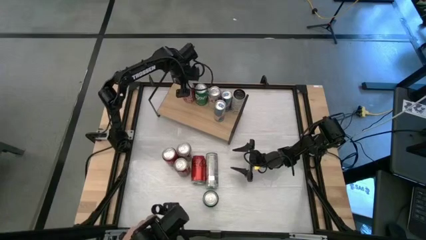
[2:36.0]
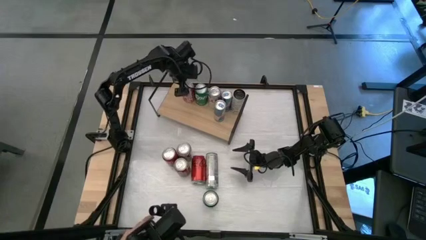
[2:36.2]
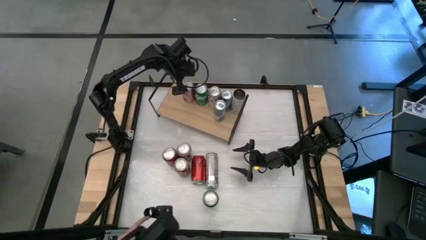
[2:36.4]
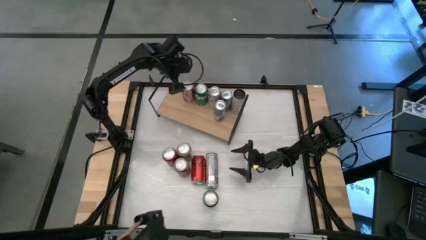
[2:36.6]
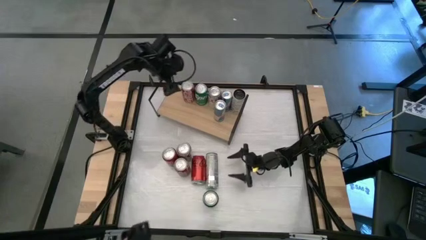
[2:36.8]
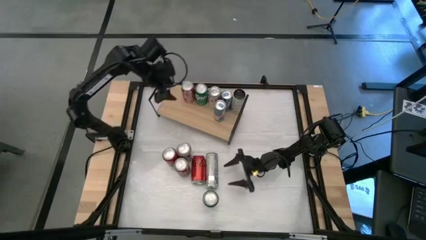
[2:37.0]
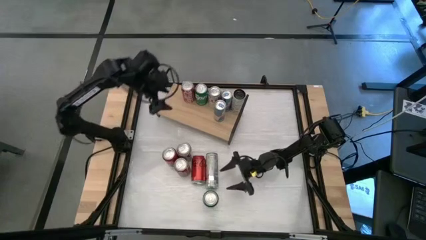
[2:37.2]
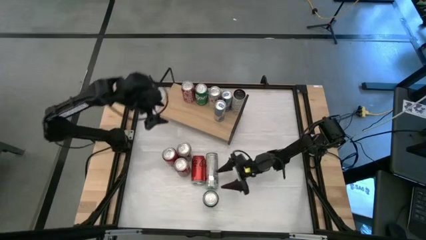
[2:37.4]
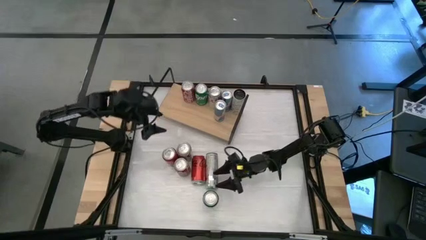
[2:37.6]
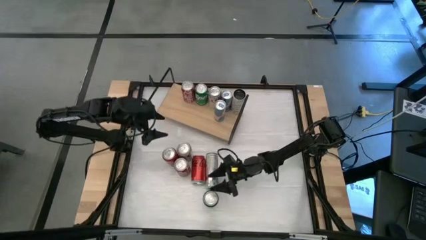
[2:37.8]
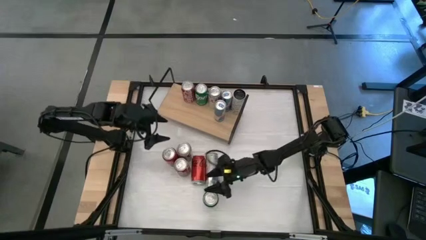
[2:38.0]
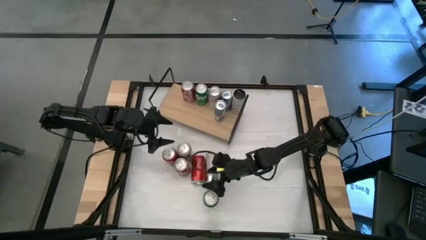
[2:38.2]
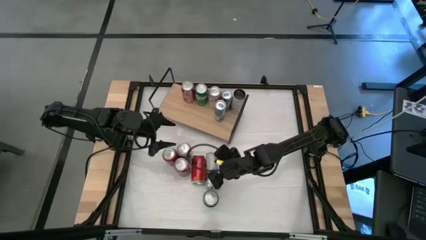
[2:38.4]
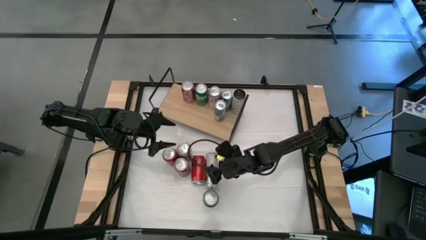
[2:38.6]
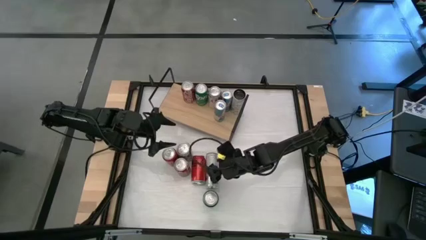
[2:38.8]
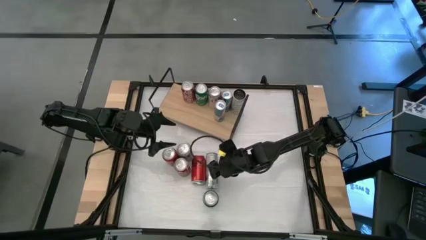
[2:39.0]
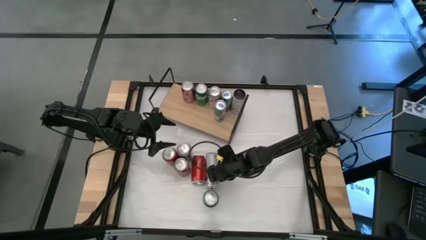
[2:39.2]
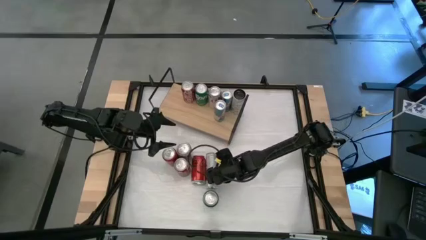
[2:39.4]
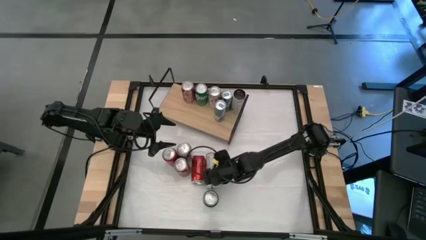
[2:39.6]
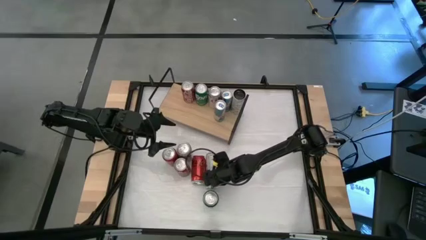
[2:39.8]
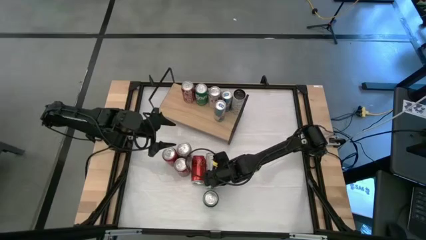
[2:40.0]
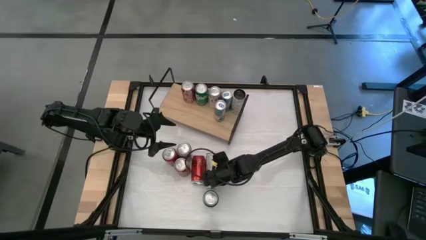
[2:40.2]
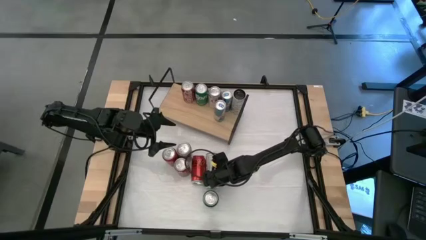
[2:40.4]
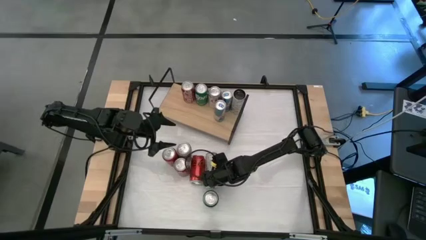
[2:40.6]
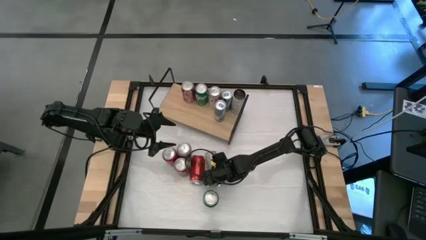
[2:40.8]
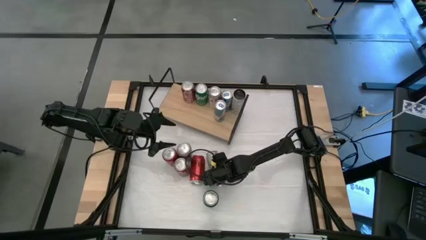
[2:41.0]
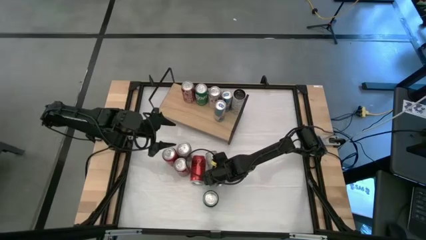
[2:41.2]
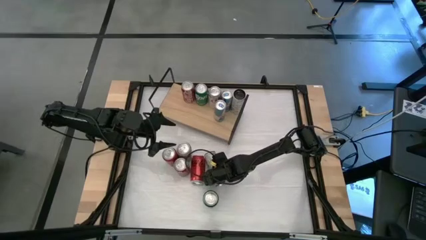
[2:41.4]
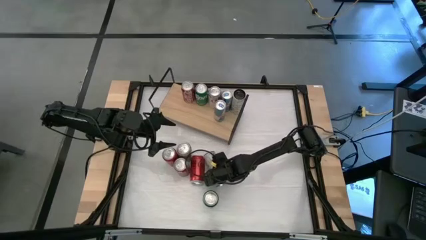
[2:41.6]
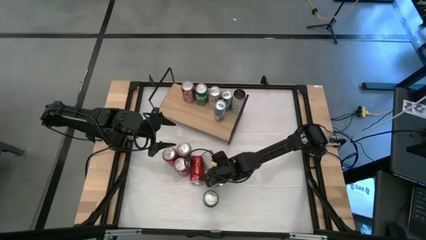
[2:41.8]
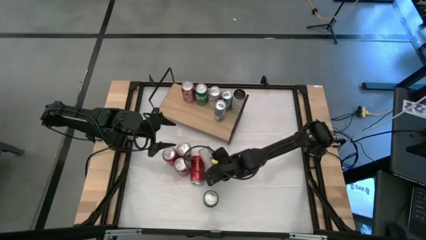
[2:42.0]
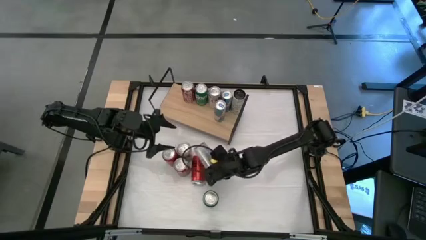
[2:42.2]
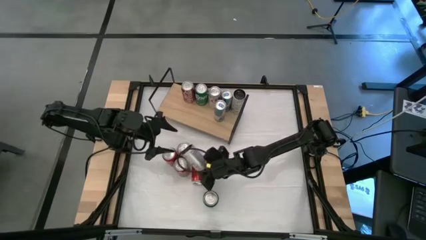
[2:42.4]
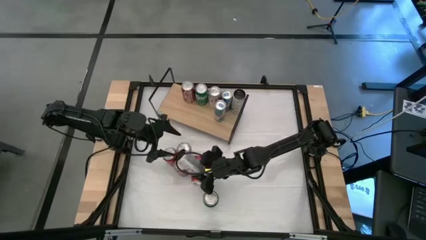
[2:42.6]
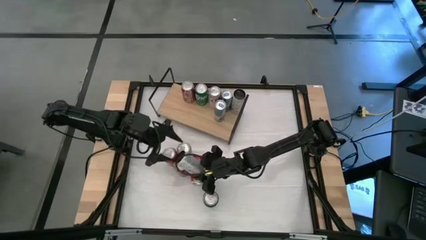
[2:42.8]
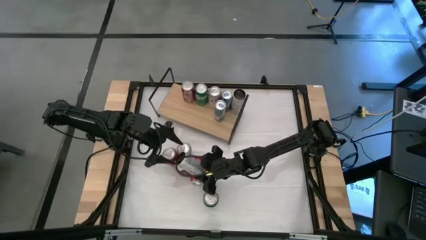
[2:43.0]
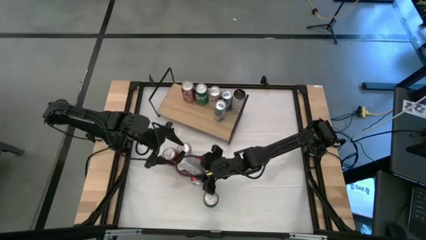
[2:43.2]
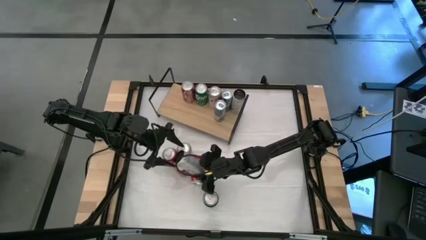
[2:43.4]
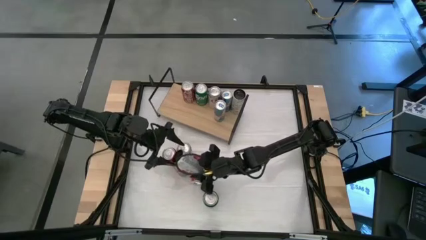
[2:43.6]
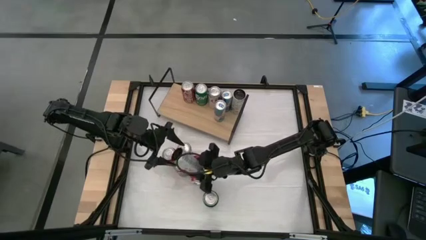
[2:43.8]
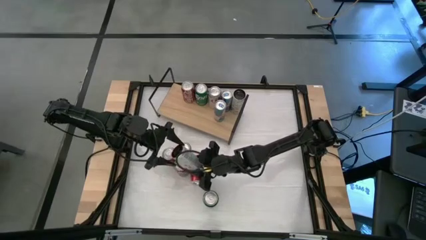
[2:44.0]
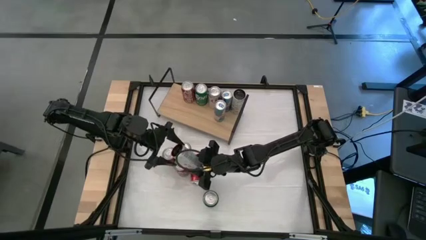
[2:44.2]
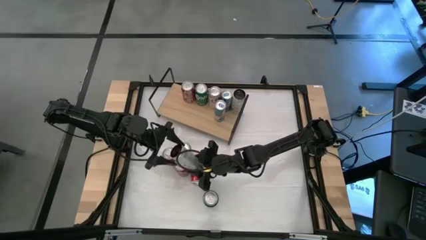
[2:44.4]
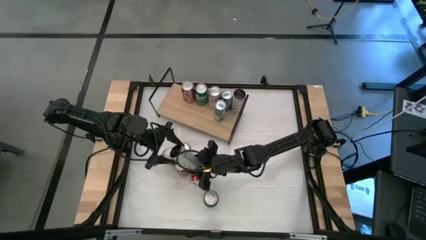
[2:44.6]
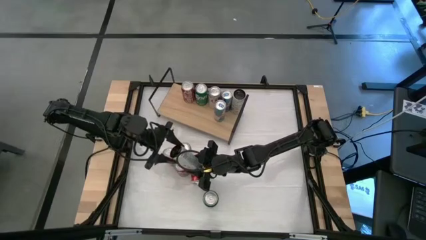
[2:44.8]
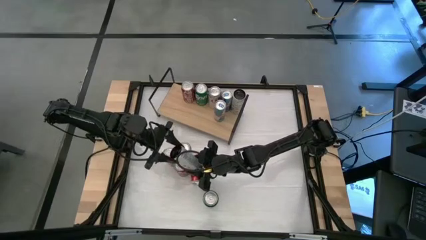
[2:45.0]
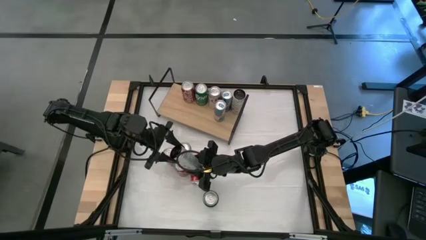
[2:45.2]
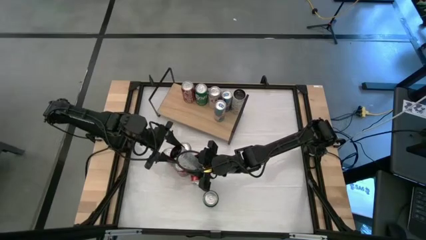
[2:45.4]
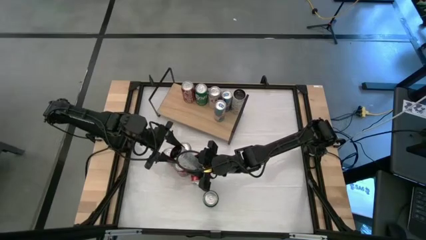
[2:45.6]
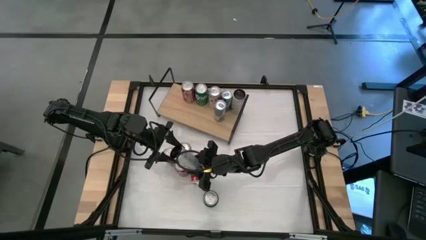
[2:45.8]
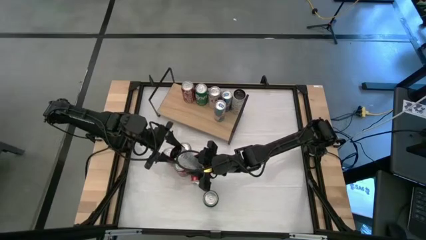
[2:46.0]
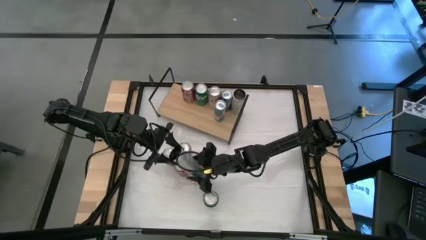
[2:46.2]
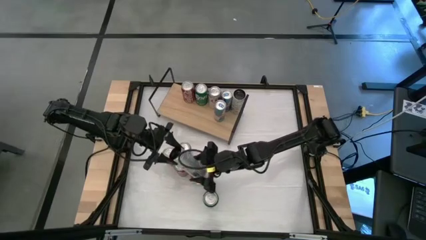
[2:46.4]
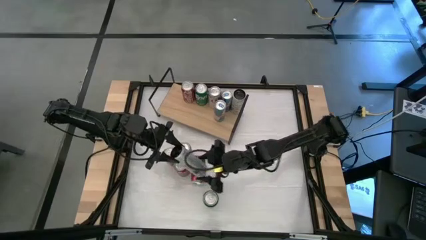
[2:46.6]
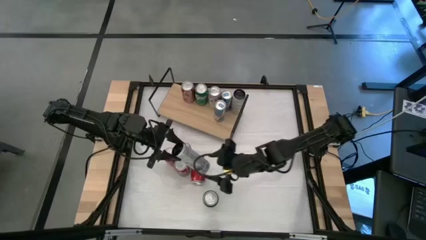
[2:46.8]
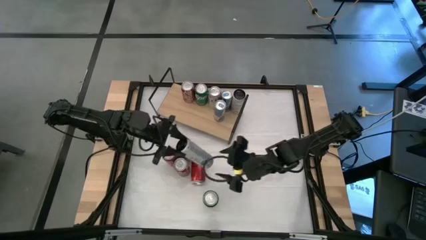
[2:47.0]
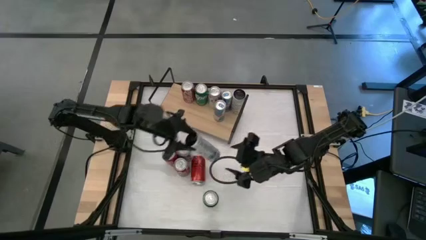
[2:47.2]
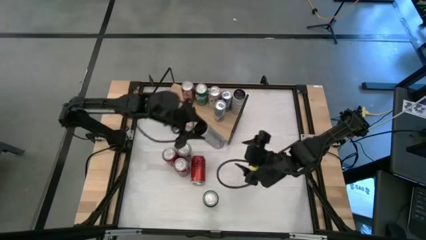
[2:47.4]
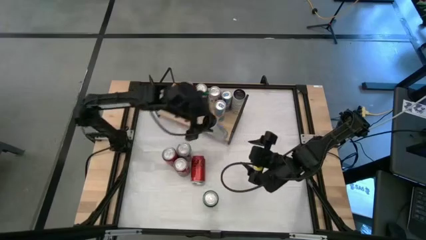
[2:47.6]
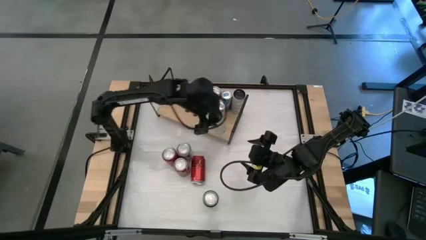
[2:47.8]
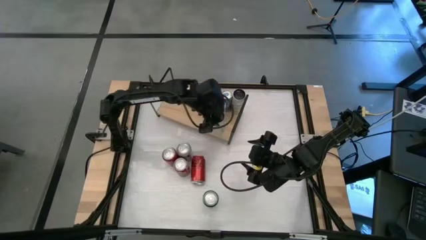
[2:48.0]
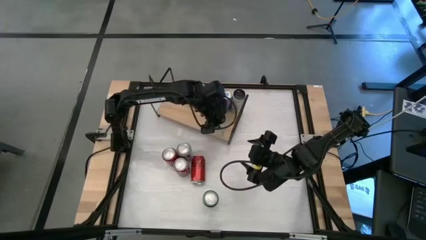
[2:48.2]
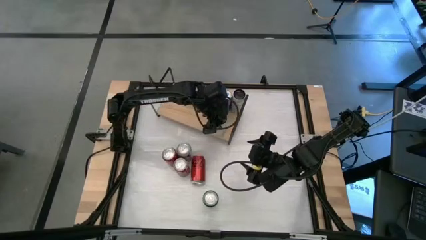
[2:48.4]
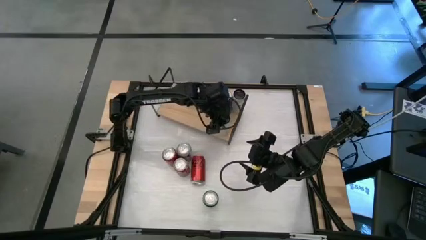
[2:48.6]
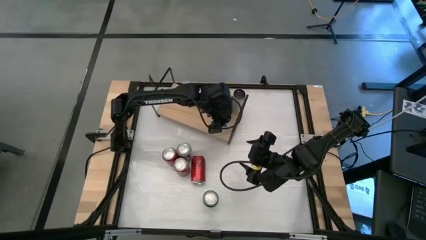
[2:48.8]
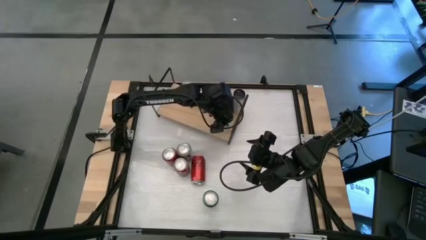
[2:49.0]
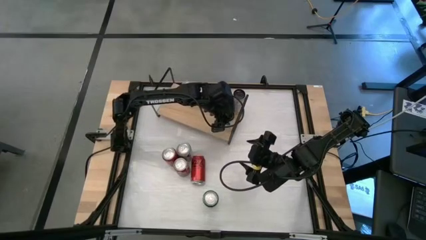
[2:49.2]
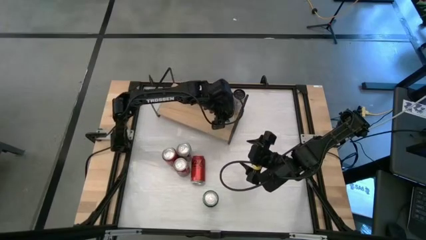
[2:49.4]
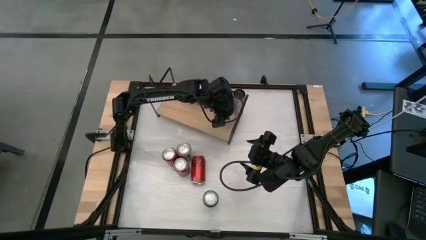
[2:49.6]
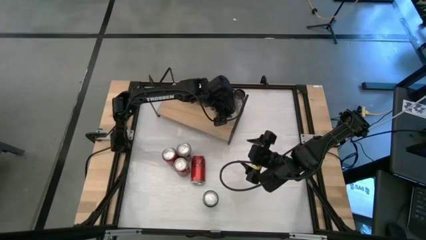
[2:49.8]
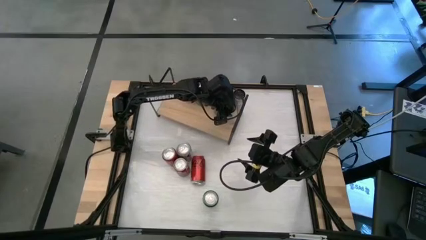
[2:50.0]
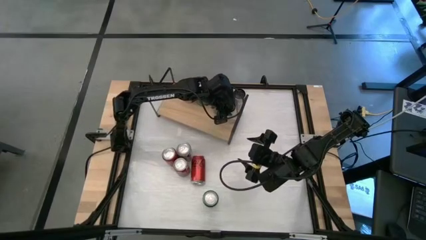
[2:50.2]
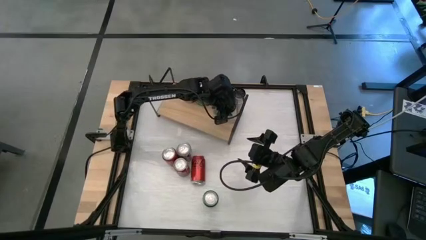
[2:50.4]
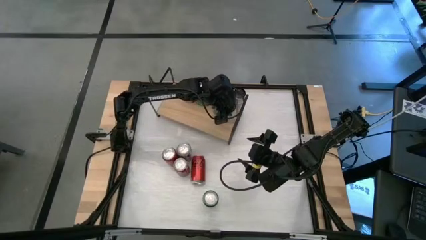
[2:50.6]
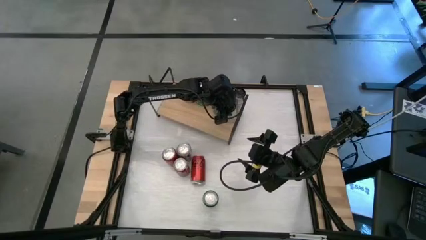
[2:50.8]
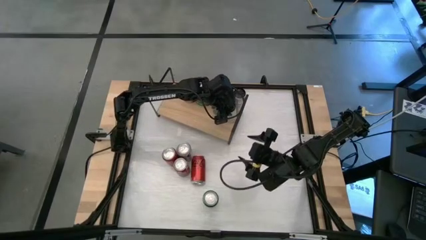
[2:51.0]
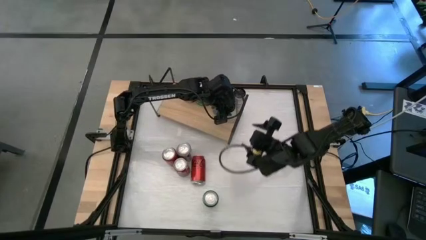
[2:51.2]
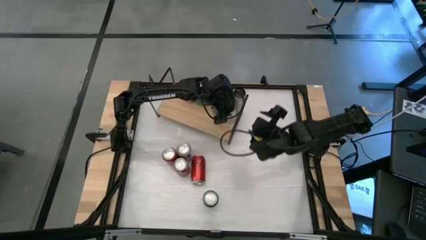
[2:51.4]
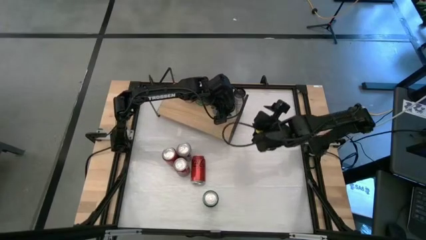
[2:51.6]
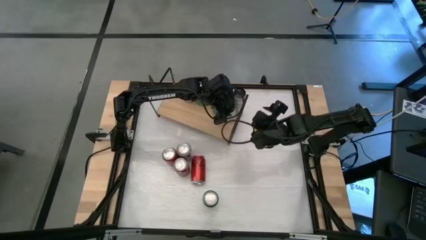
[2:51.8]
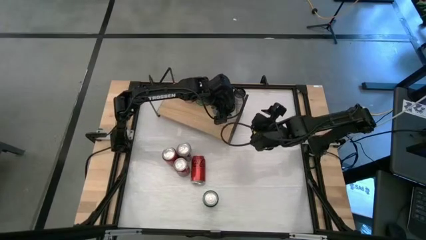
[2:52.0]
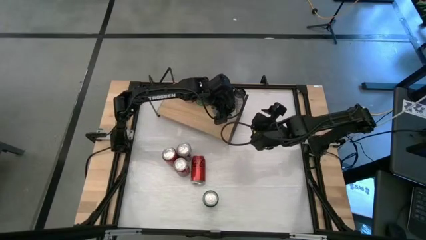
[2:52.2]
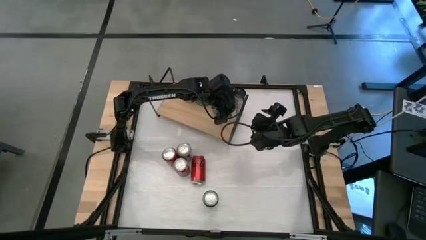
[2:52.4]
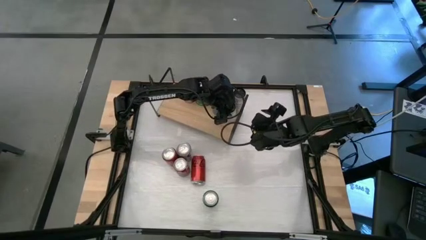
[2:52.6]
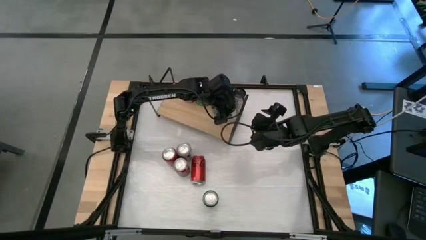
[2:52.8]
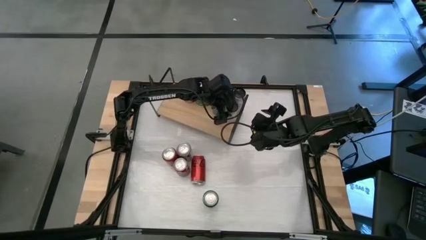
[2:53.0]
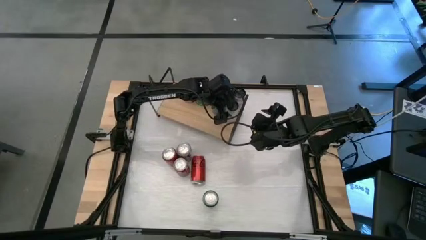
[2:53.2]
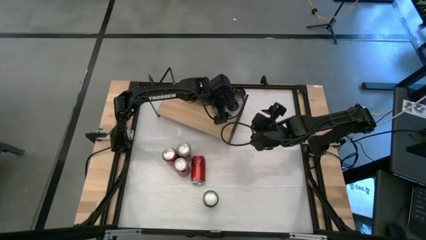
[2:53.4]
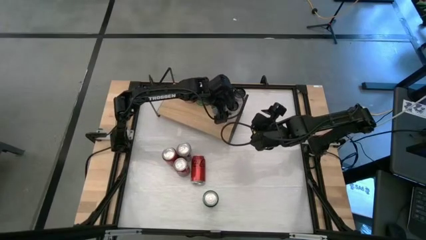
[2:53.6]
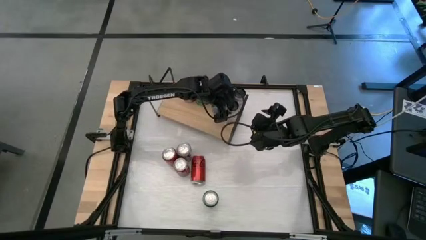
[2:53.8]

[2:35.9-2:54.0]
Task: Place canned beverage on shelf
Put the white yellow soda can on the shelf aligned with the other white yellow soda can
